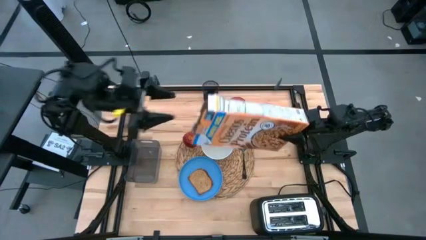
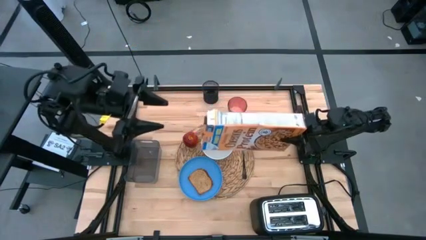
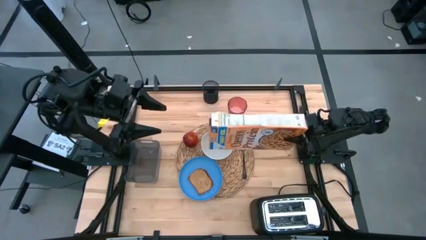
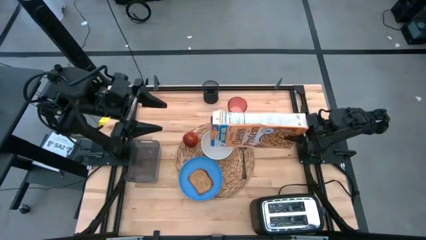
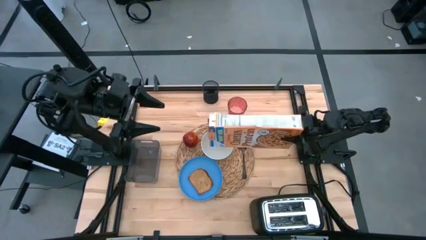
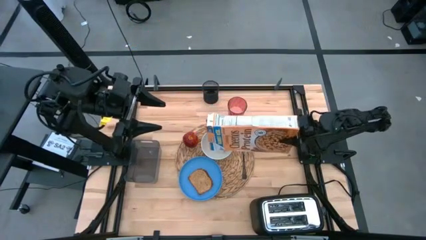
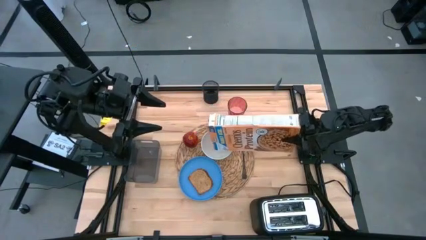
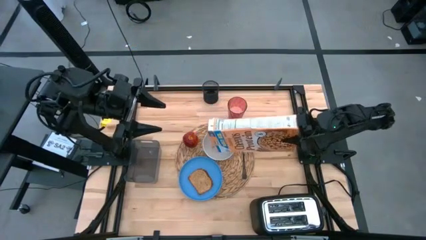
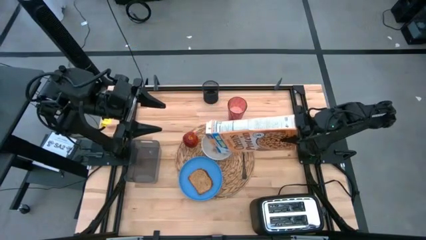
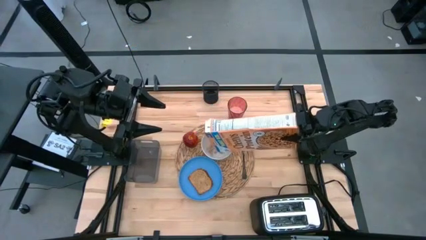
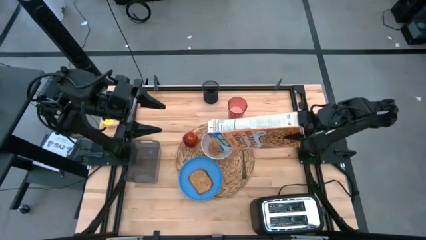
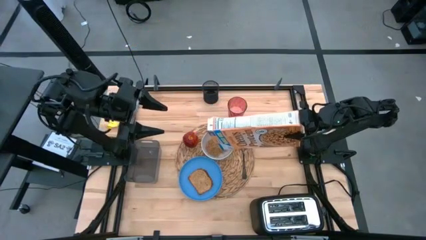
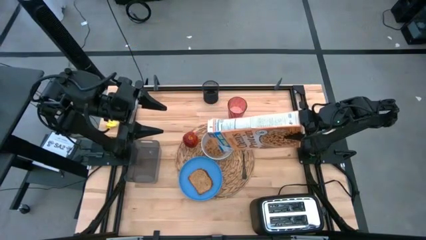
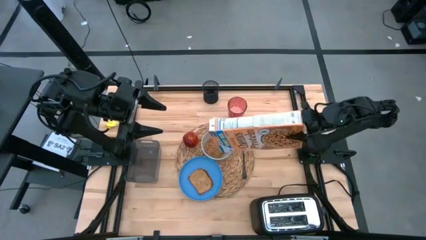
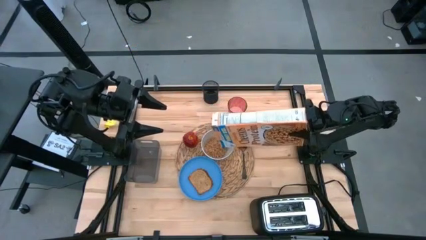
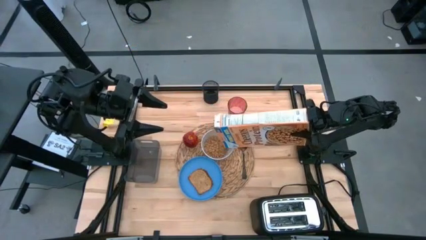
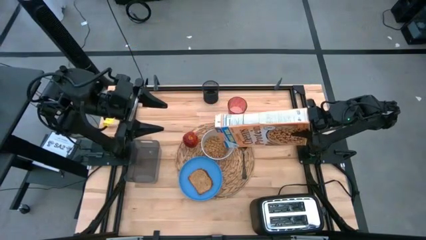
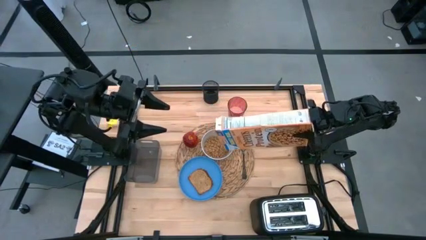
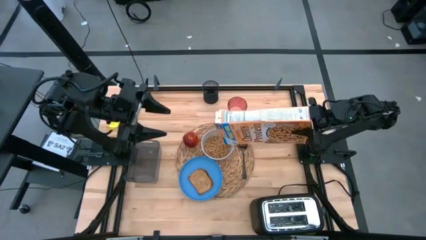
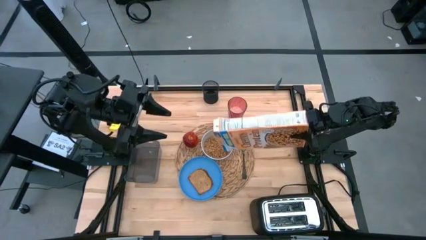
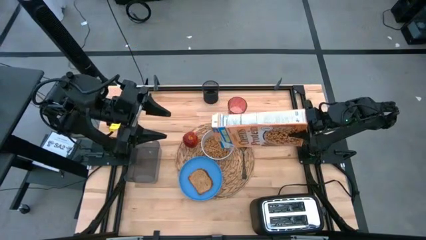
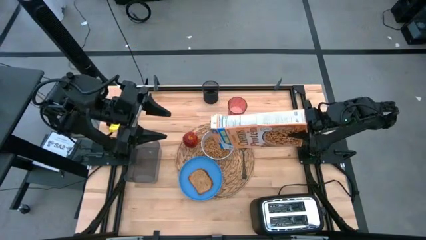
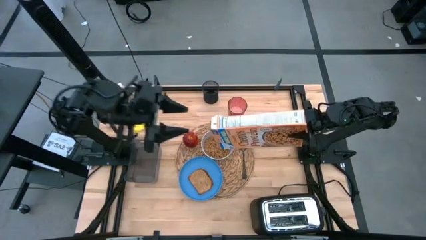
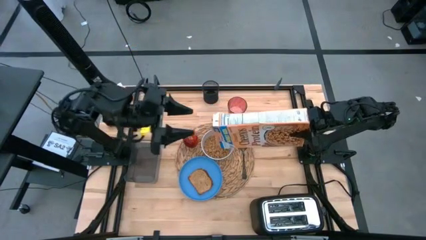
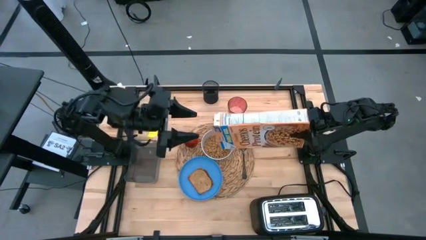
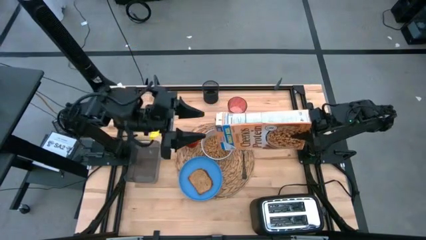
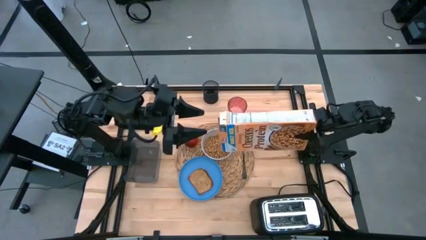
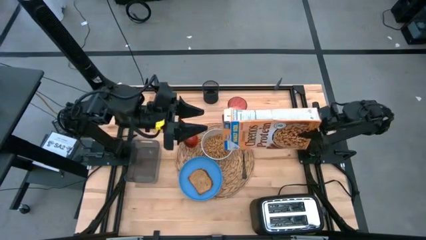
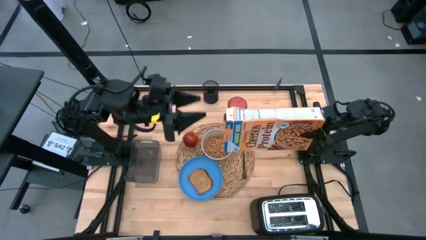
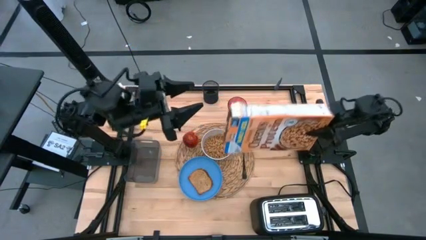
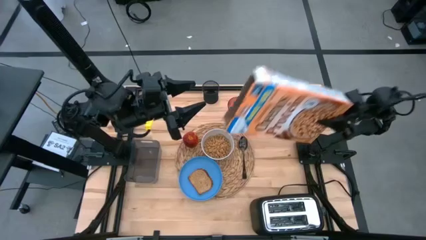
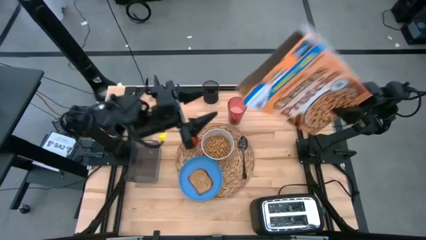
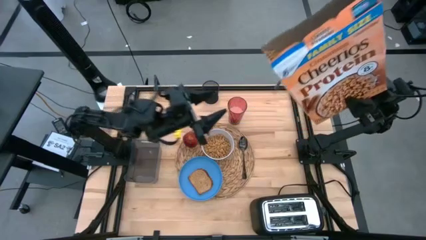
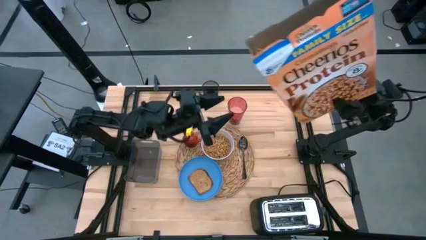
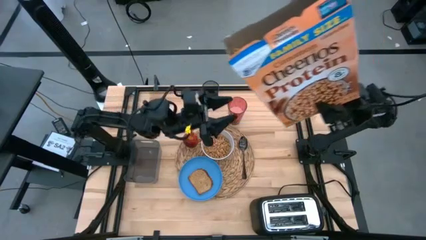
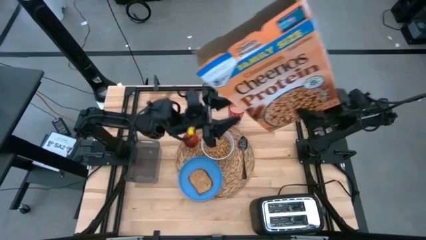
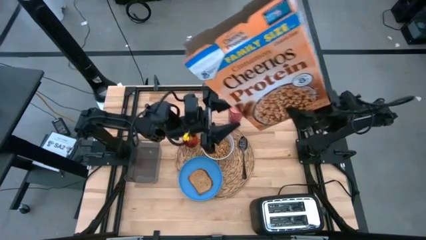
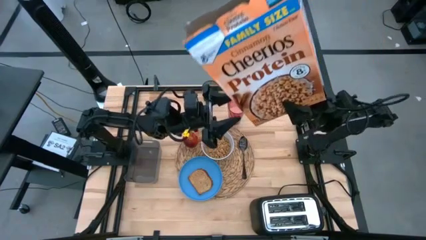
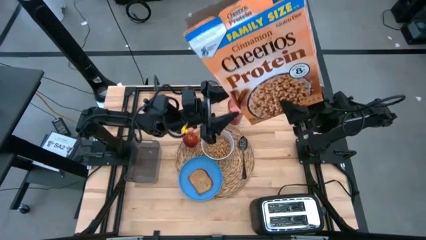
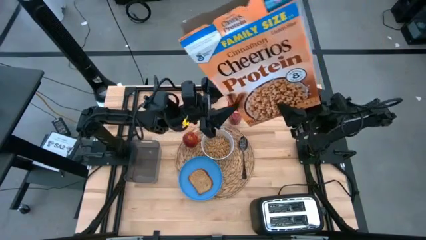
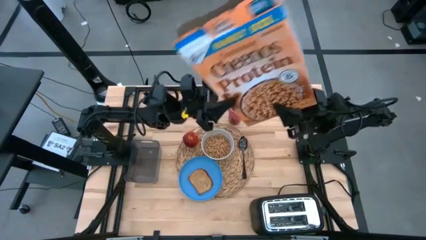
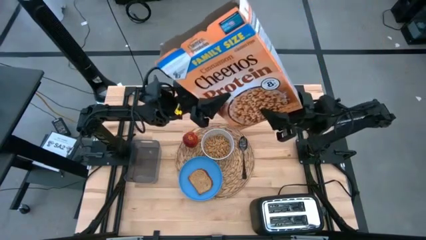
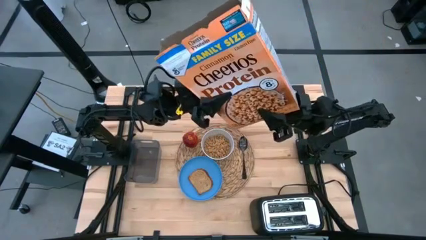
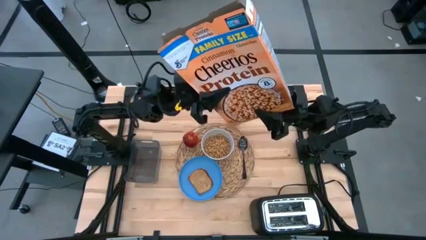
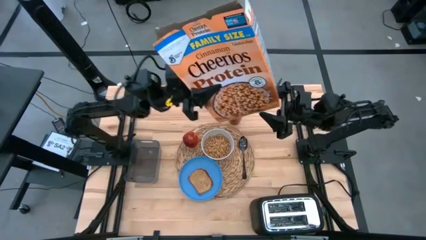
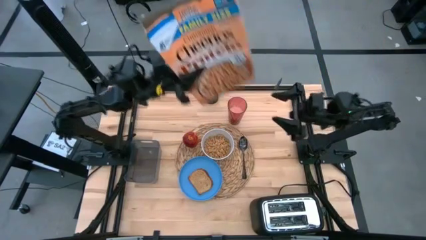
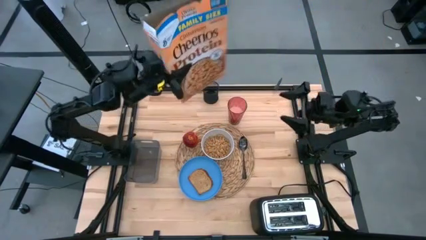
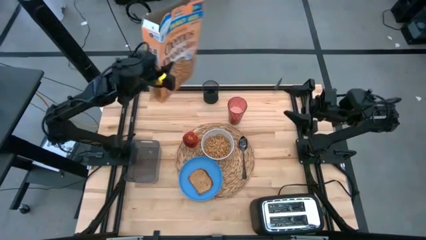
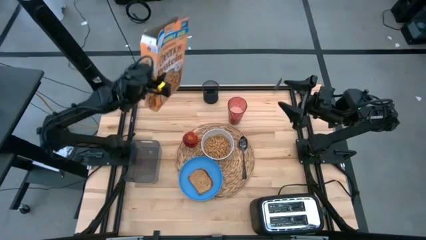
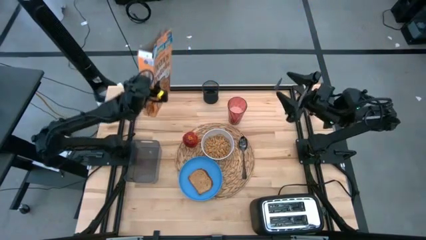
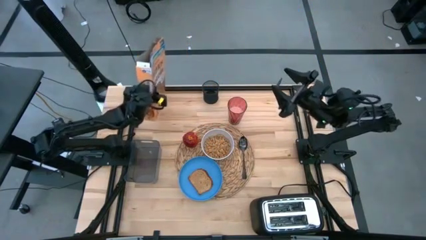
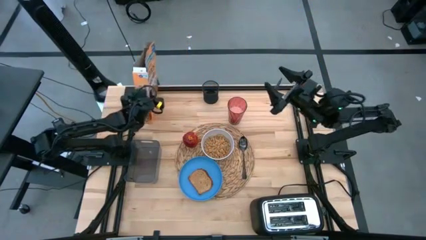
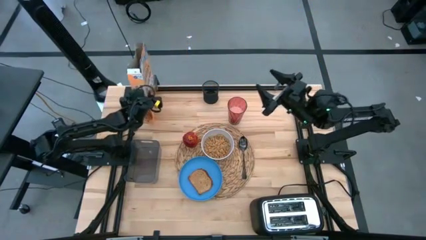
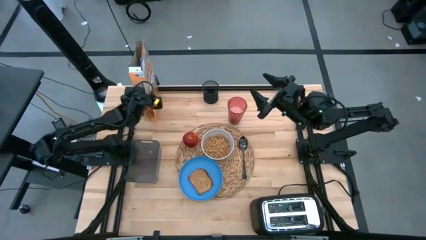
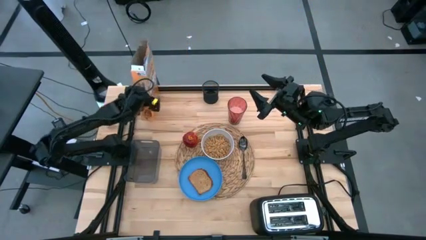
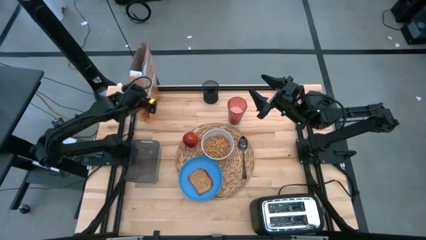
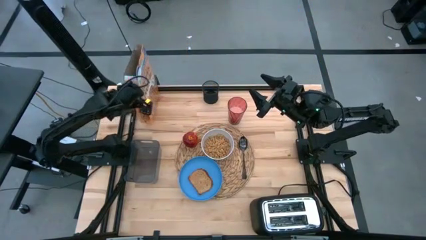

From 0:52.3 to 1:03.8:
Task: Arrange a breakfast setting
Pour the cereal into the white bowl

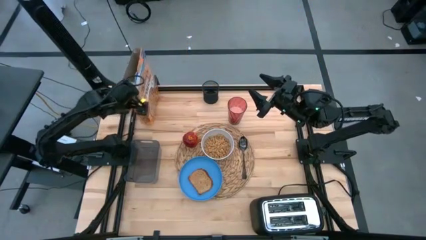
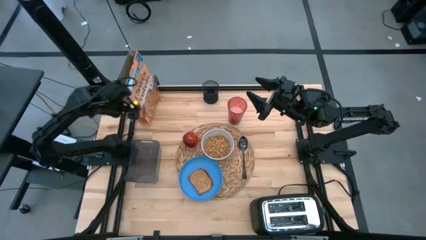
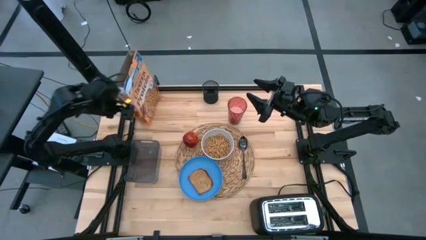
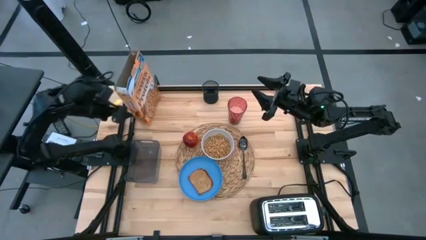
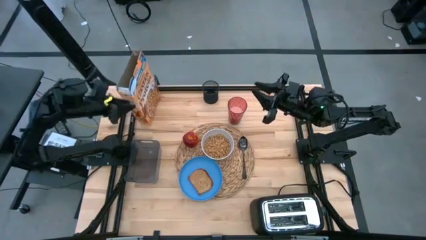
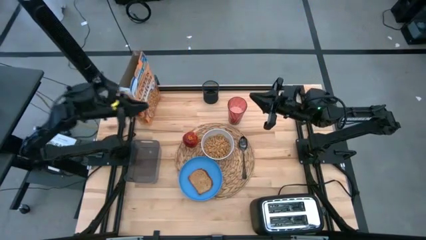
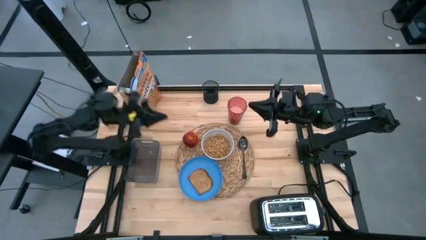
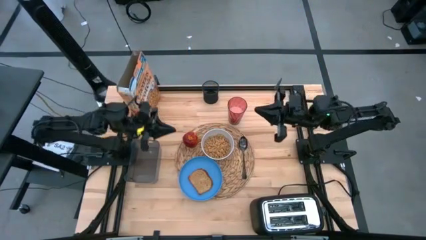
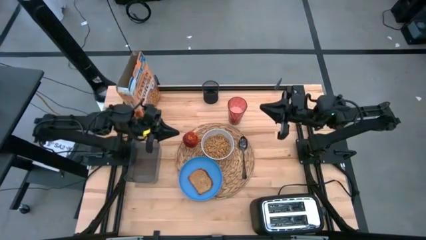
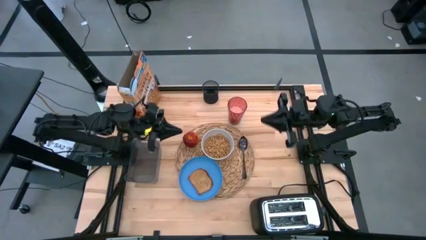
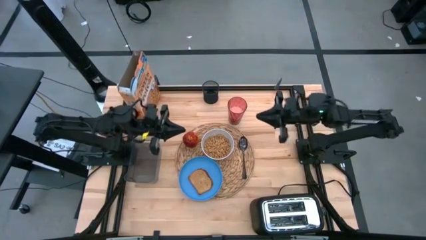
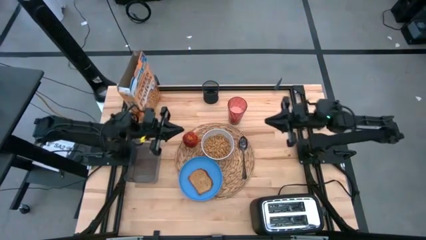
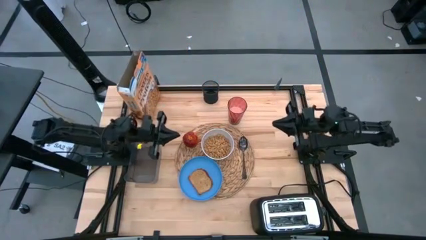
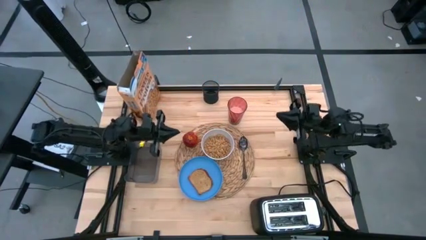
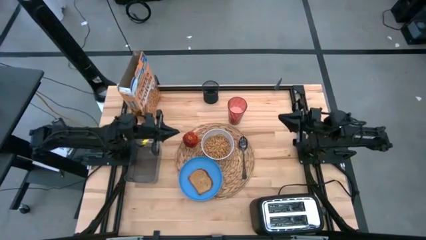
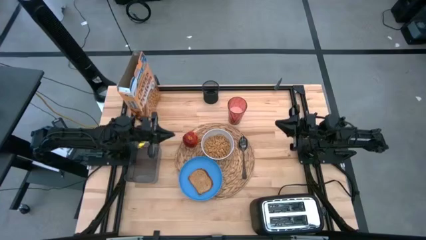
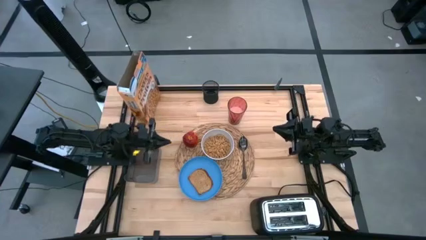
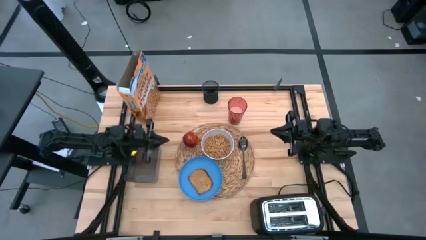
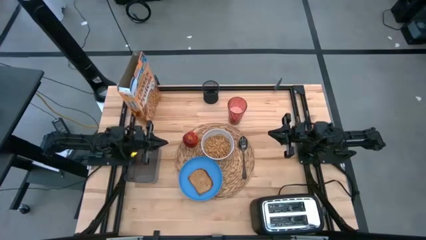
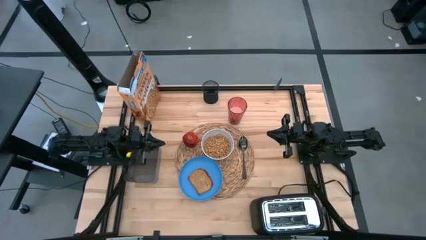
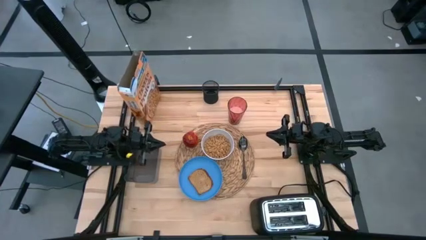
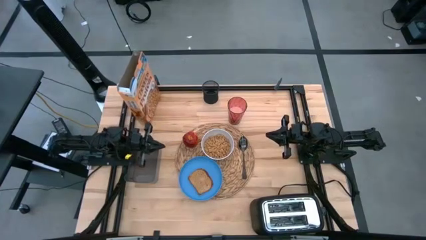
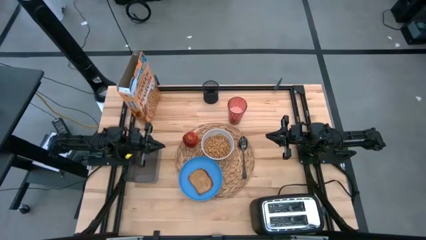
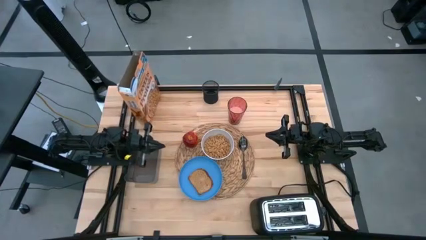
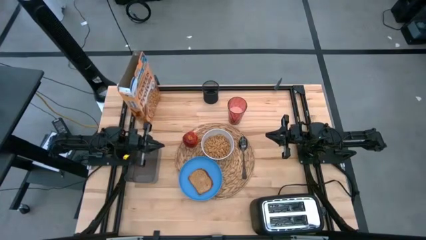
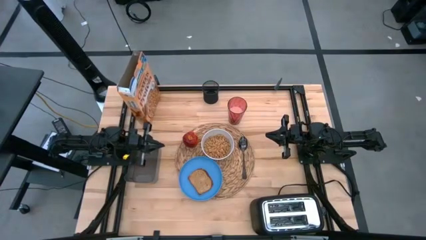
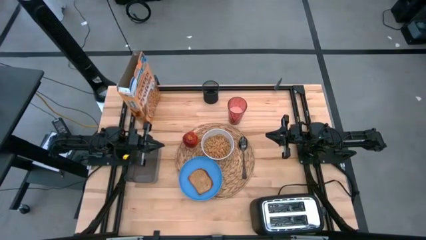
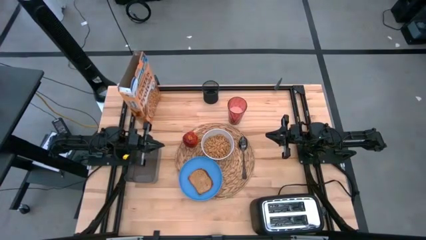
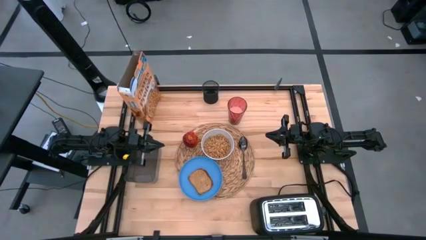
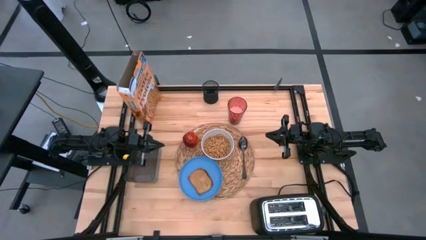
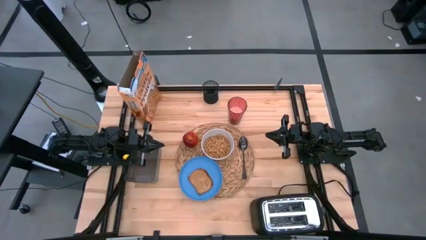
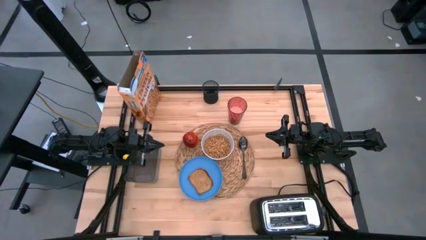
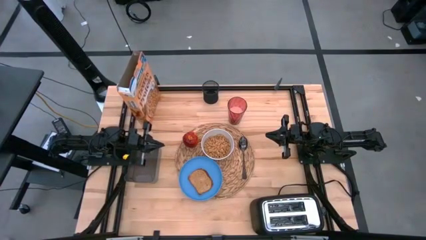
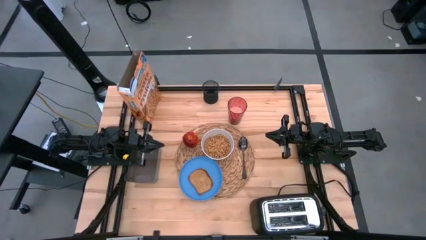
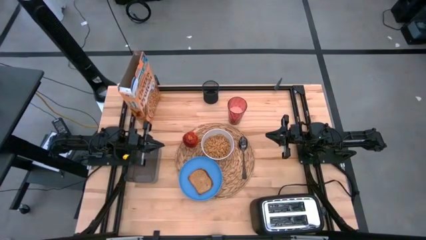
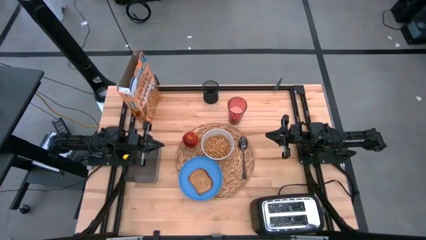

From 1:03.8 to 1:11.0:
Return to Home Position
